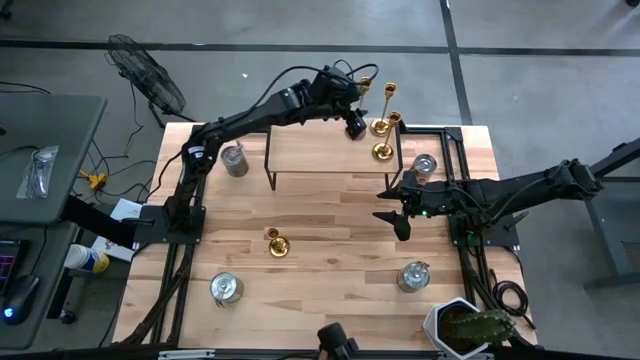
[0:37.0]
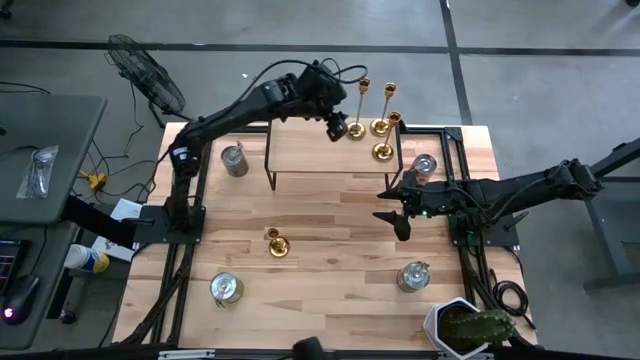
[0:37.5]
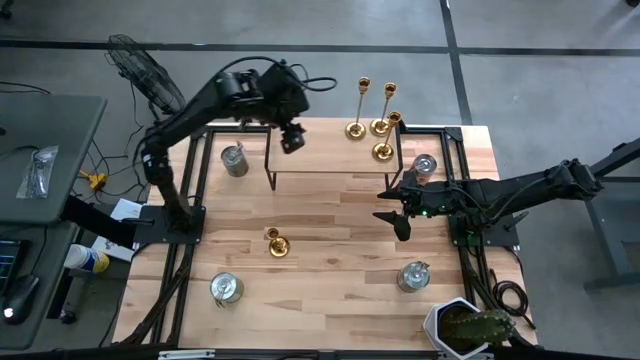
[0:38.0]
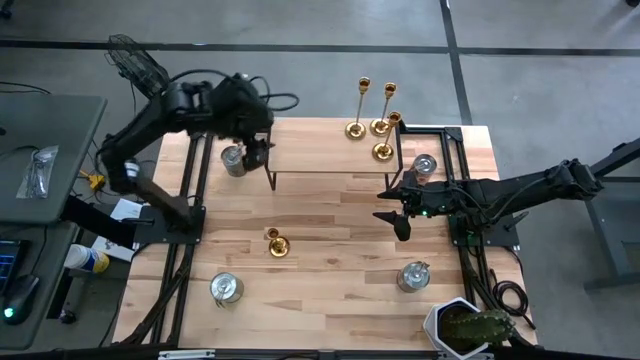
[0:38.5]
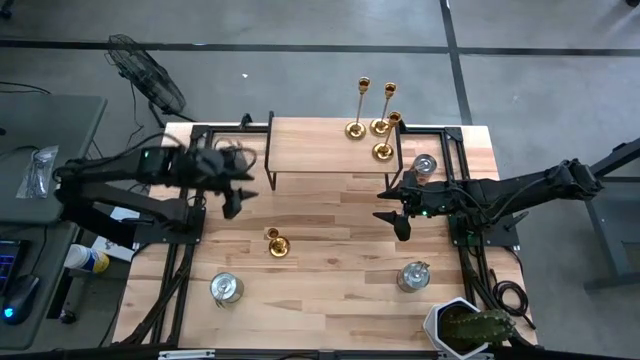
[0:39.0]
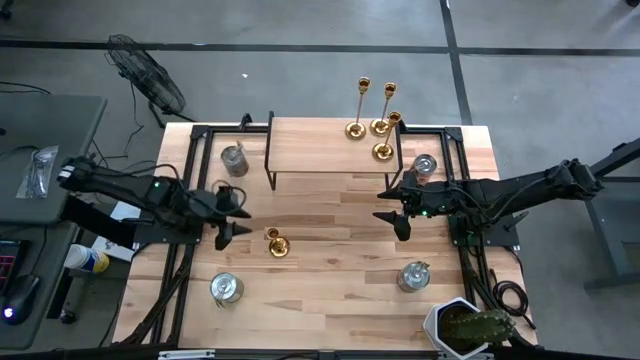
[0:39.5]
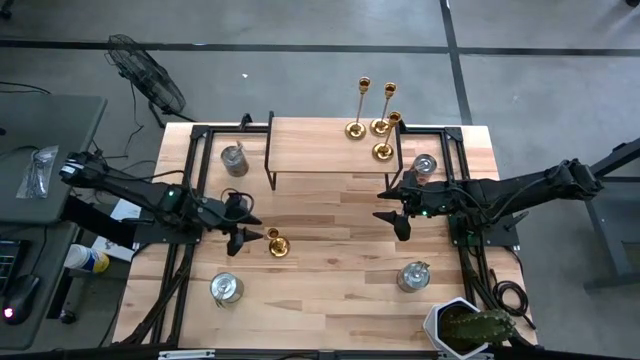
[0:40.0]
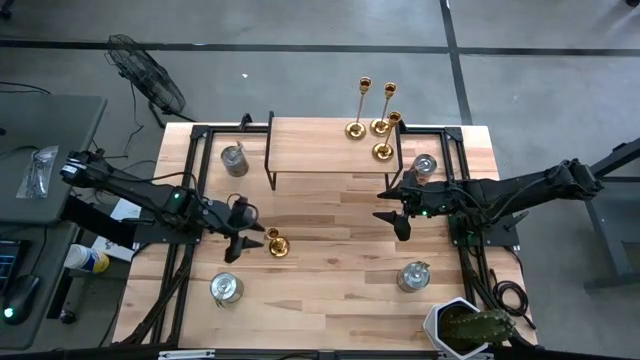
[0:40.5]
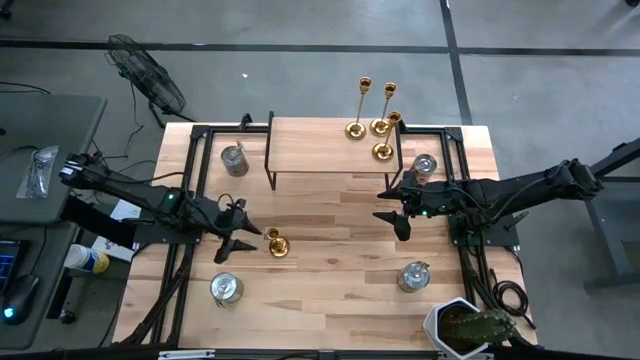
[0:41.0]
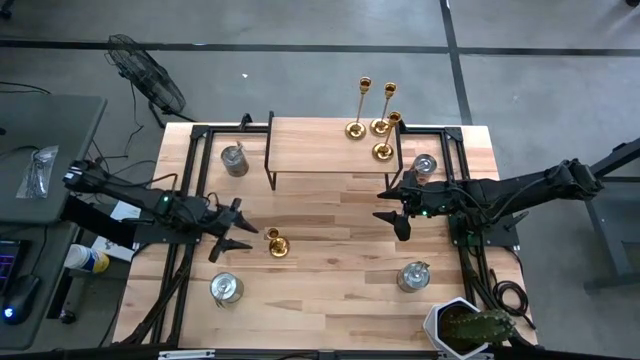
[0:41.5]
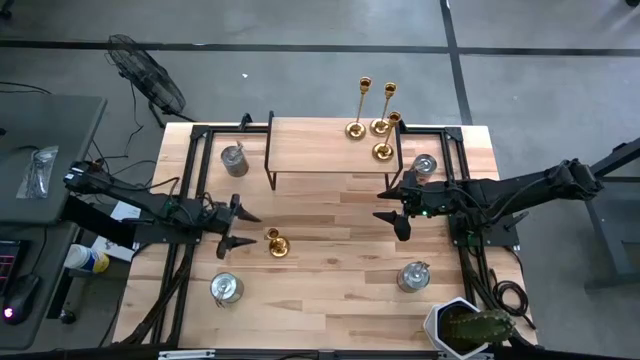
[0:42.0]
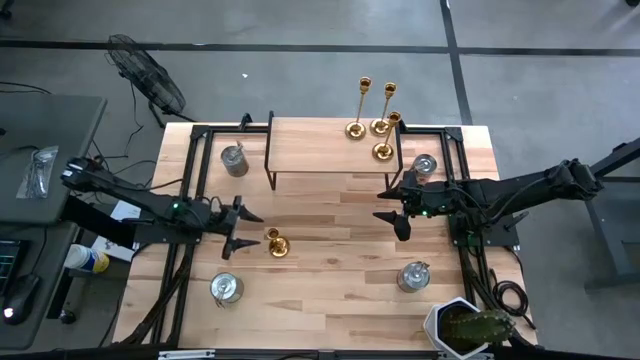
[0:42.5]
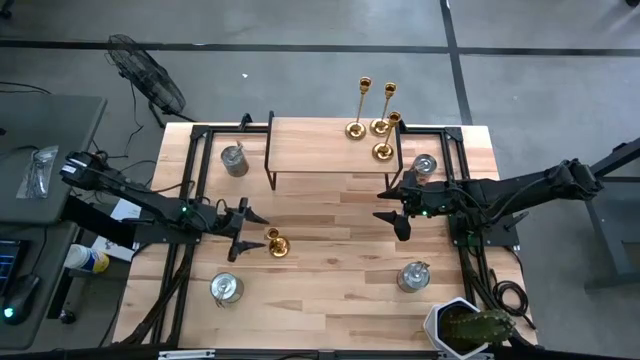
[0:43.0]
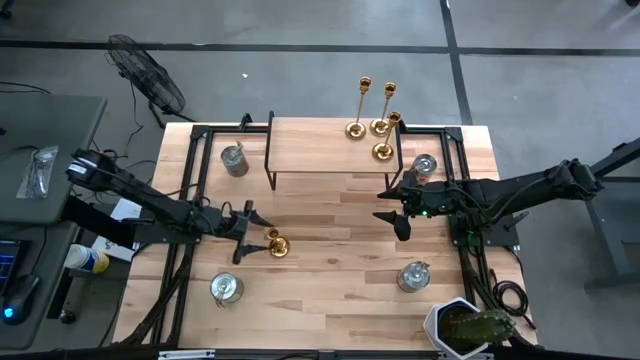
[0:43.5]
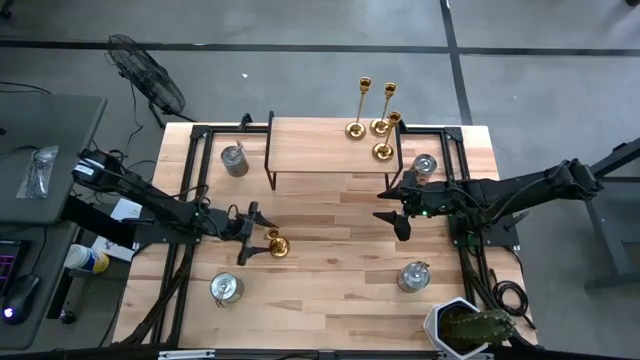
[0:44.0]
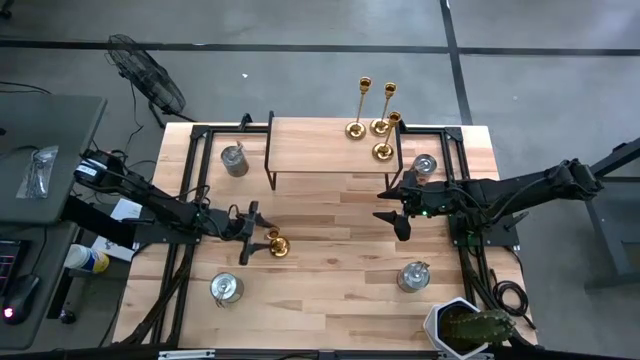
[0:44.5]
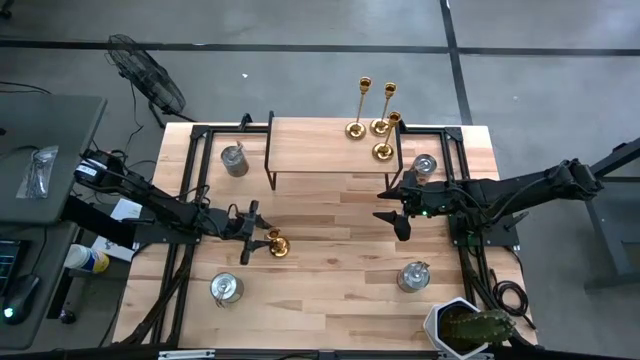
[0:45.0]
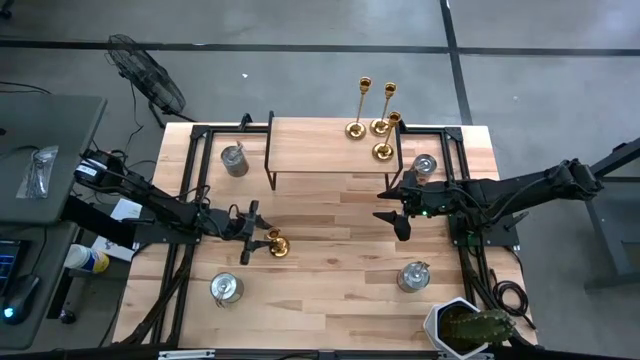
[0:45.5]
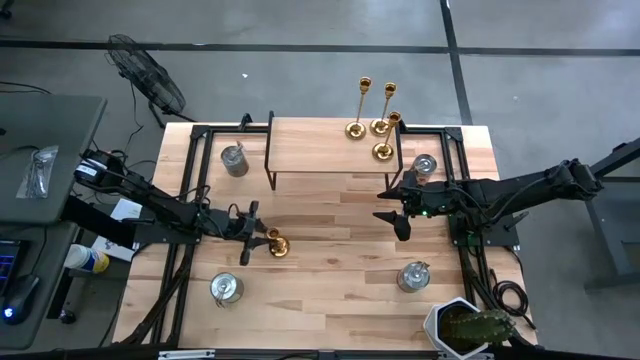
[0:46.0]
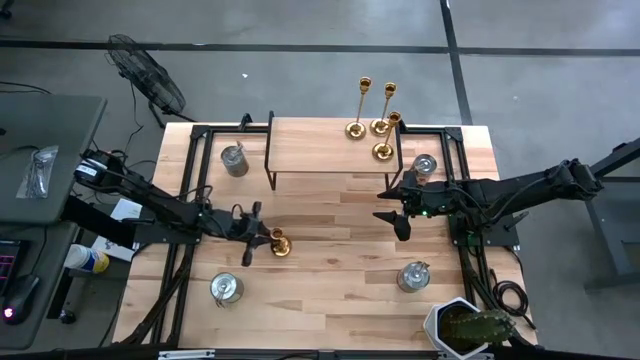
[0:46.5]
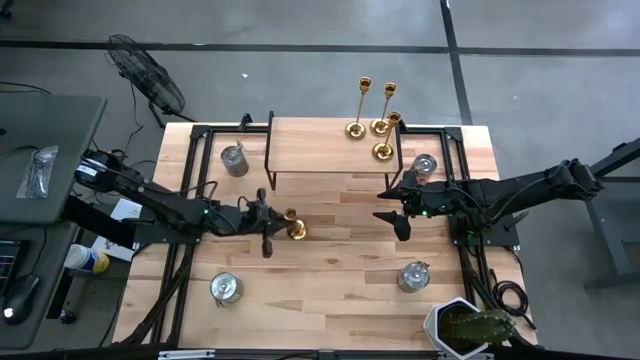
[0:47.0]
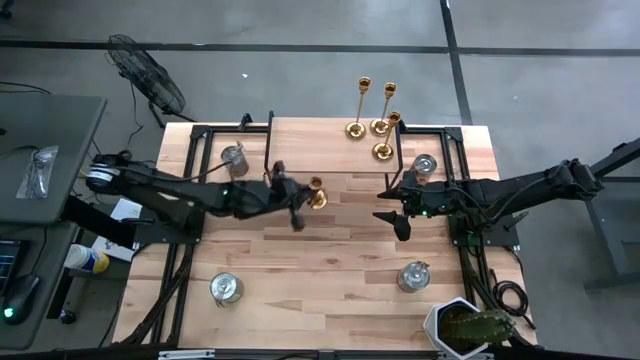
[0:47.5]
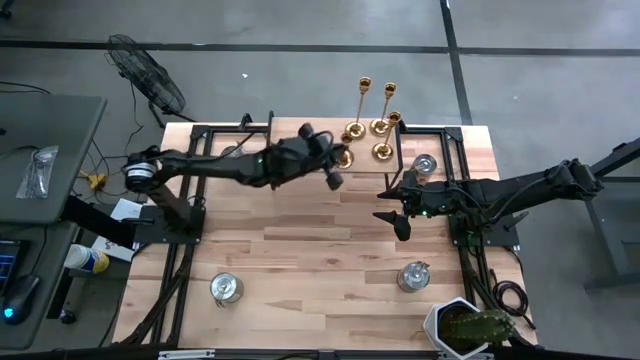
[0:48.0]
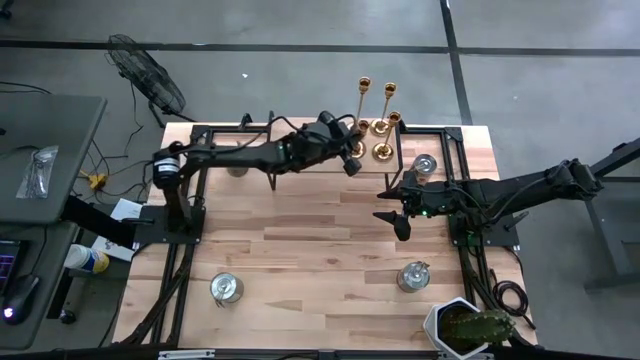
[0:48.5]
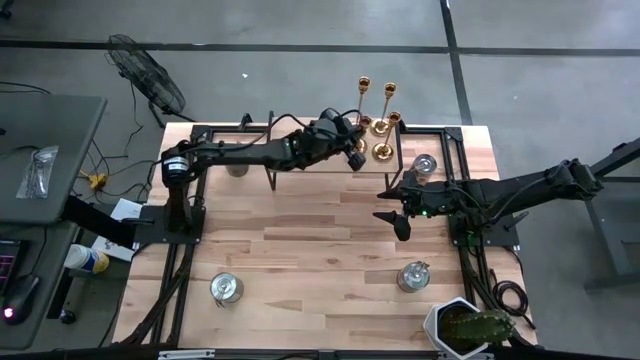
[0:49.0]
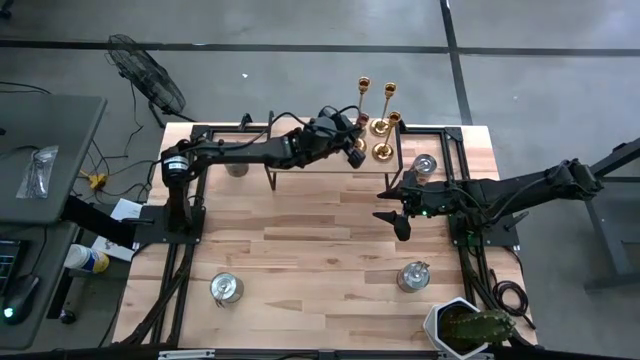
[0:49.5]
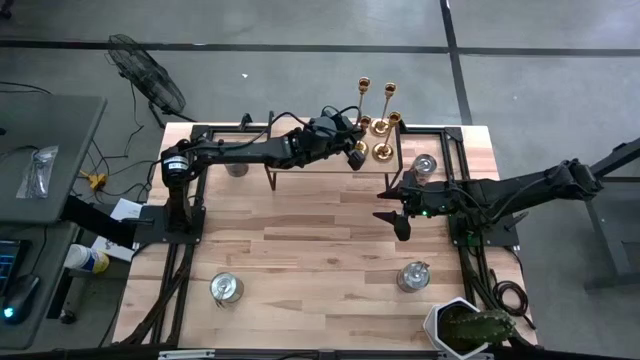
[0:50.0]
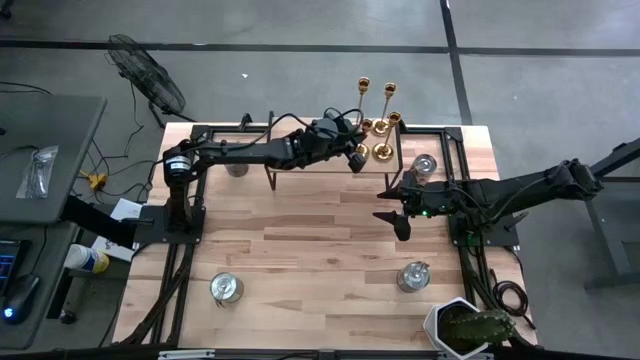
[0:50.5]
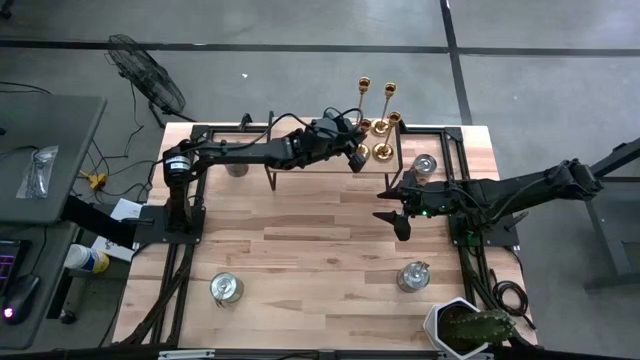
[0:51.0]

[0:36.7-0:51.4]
Task: Pick & Place candle stick holders
Align the gold candle holder on the shelf with the gold candle holder

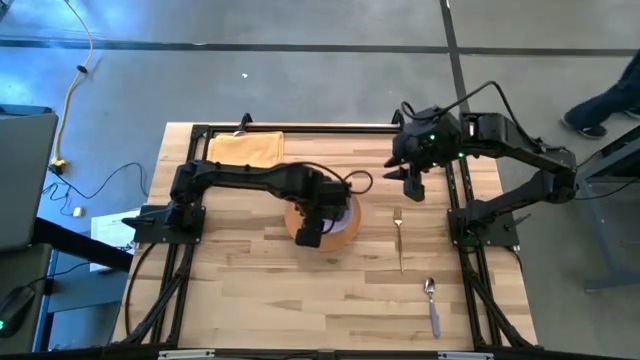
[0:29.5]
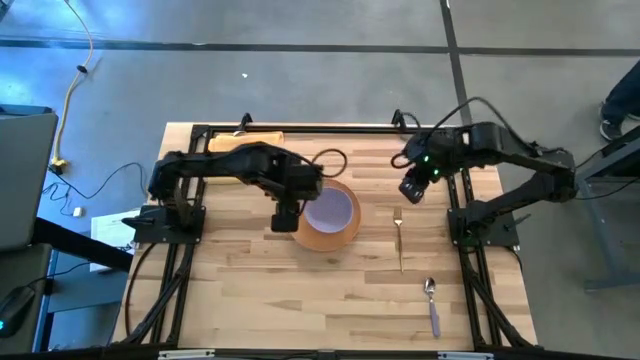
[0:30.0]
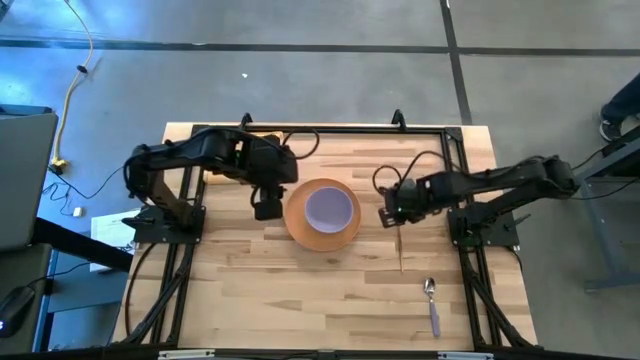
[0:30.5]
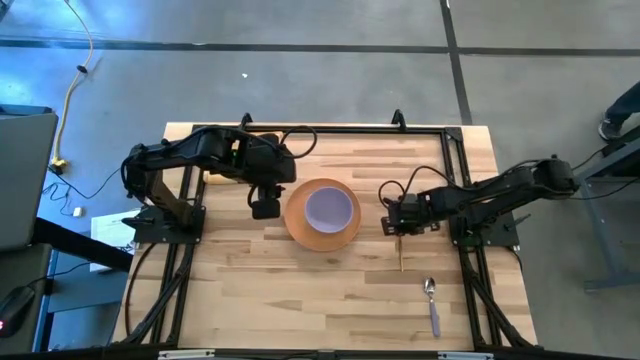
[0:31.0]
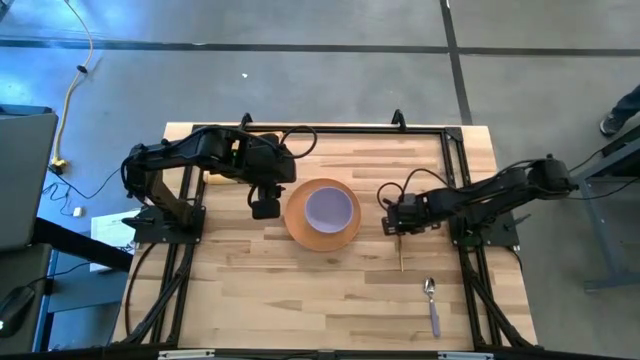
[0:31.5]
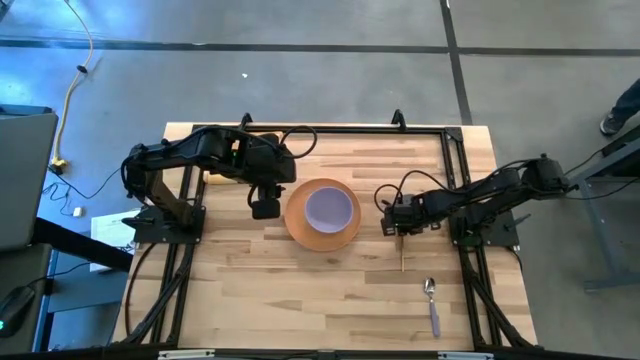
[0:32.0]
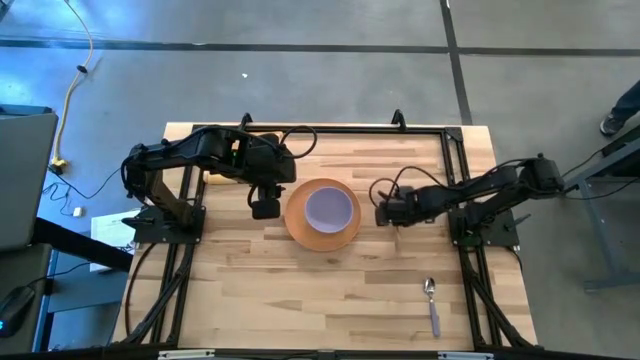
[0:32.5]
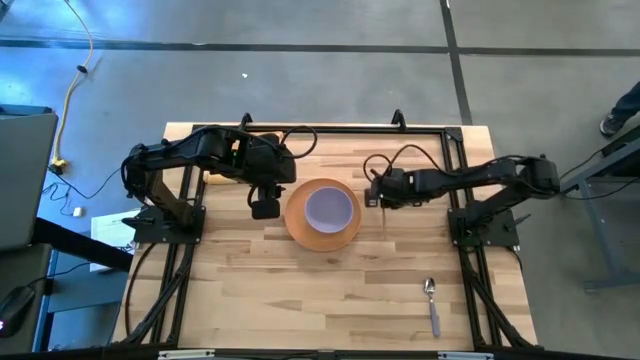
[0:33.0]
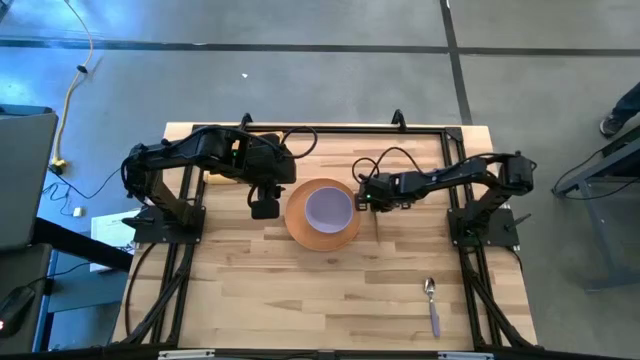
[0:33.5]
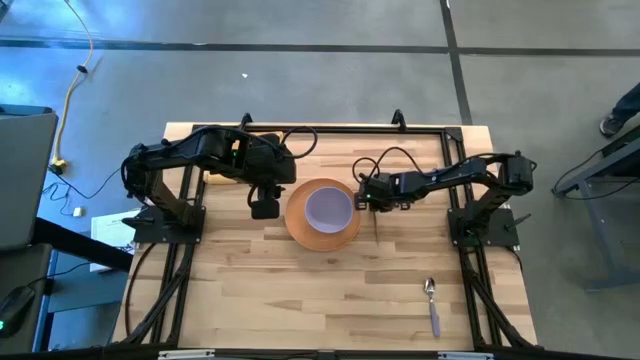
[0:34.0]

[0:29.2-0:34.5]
Task: Set table place
Move the gold fork to the right of the orange plate
